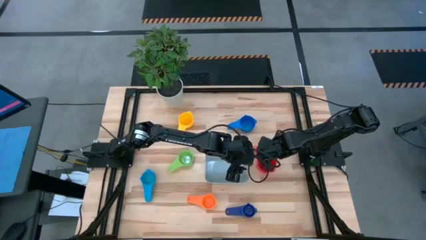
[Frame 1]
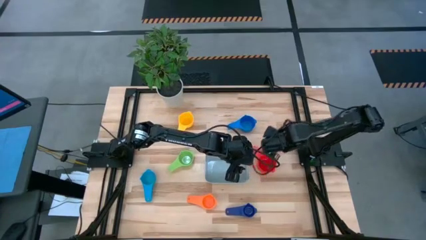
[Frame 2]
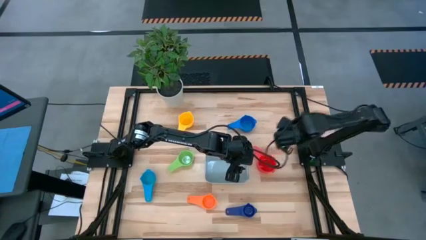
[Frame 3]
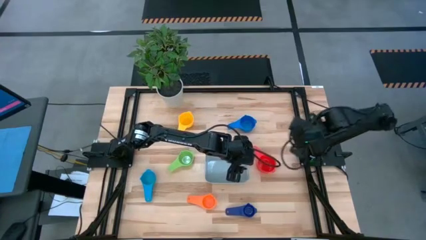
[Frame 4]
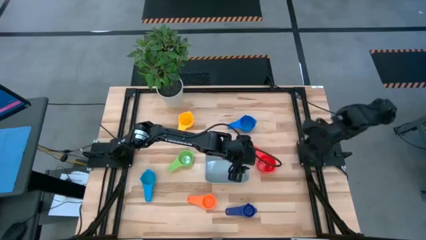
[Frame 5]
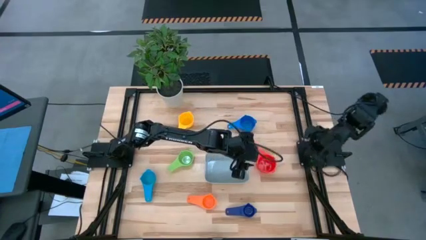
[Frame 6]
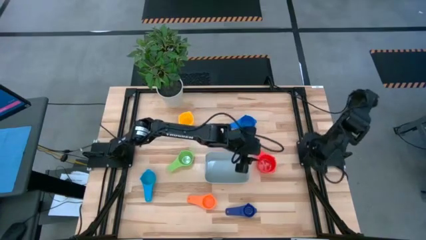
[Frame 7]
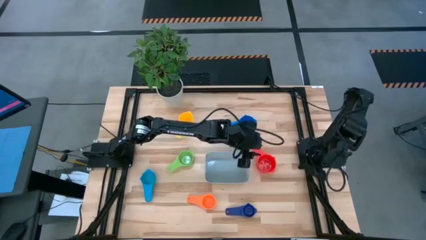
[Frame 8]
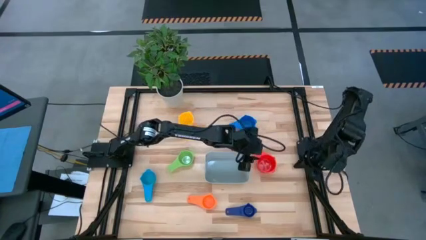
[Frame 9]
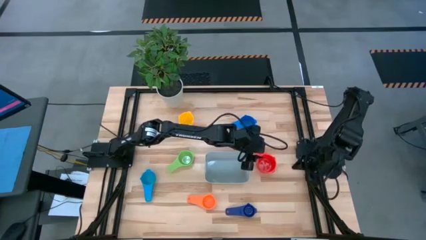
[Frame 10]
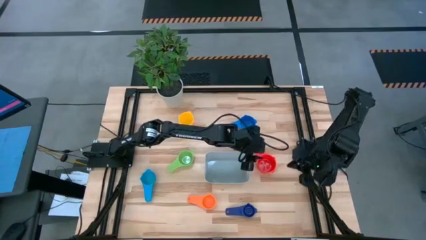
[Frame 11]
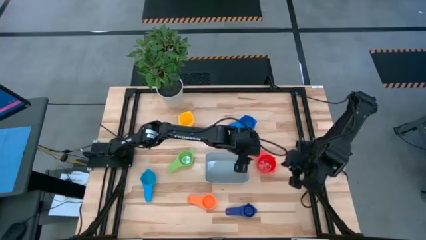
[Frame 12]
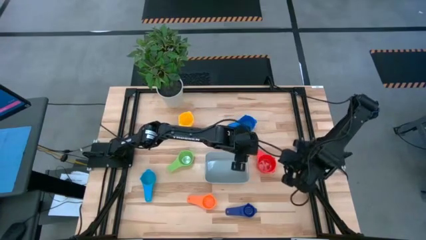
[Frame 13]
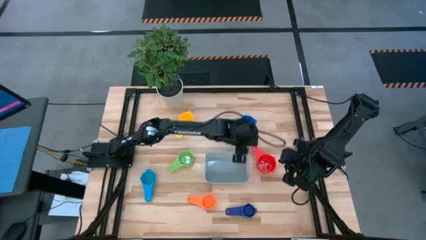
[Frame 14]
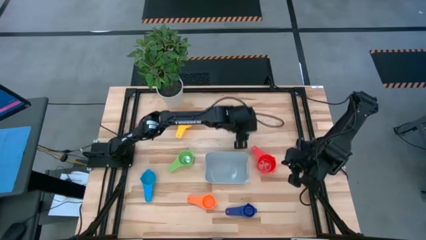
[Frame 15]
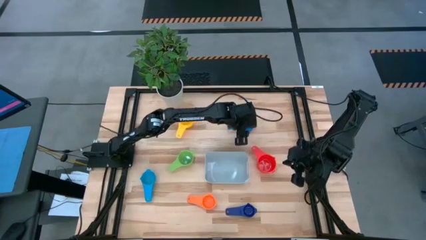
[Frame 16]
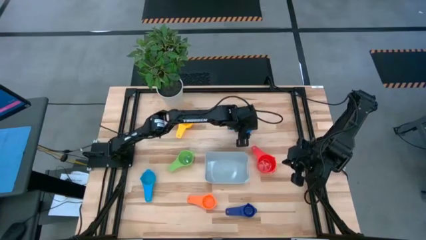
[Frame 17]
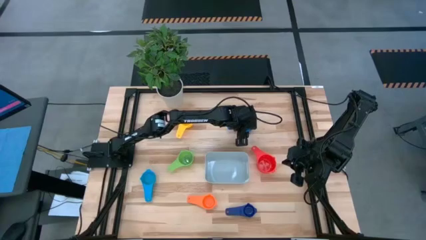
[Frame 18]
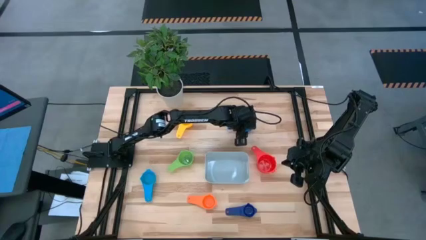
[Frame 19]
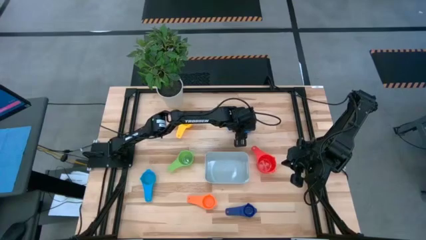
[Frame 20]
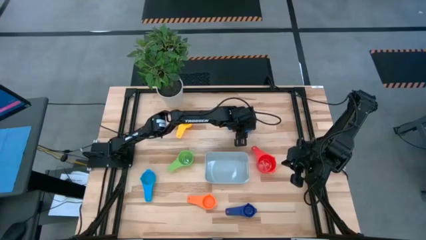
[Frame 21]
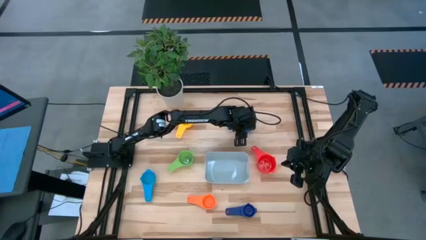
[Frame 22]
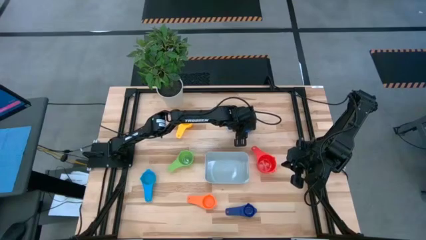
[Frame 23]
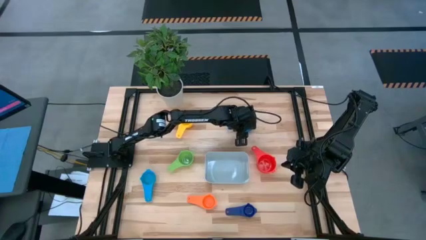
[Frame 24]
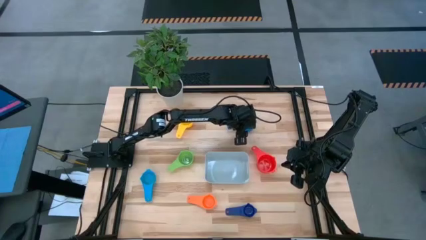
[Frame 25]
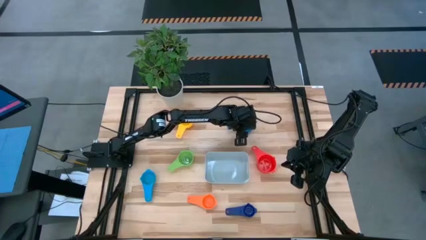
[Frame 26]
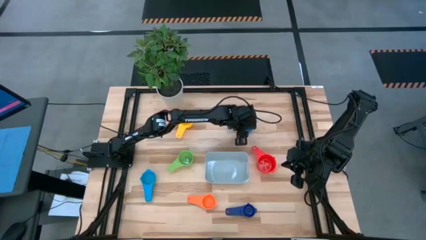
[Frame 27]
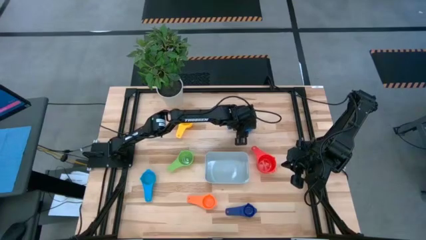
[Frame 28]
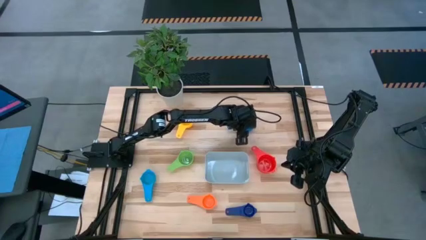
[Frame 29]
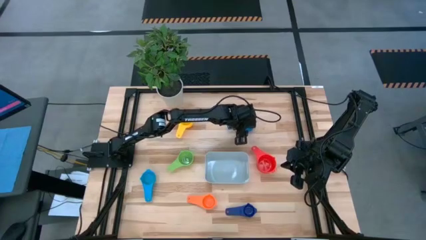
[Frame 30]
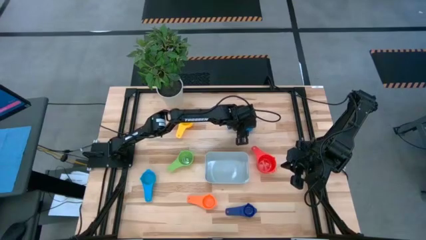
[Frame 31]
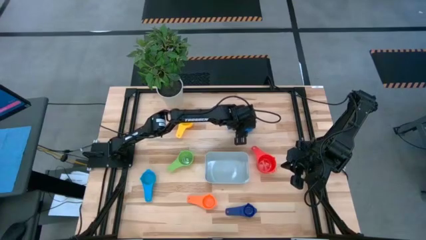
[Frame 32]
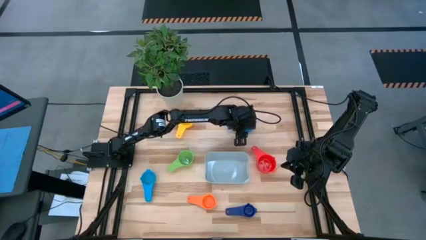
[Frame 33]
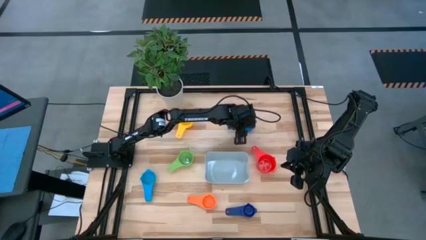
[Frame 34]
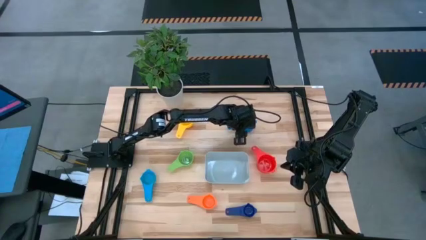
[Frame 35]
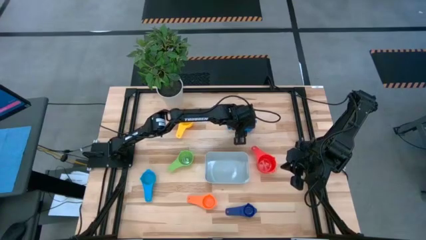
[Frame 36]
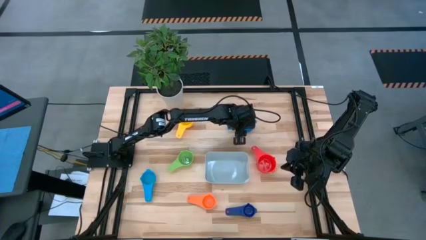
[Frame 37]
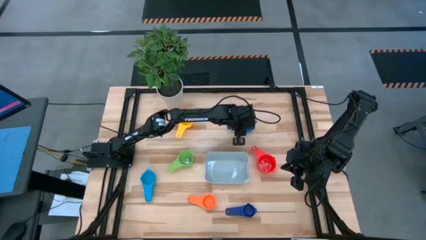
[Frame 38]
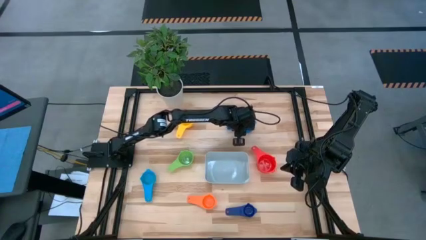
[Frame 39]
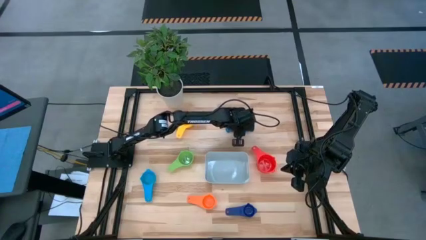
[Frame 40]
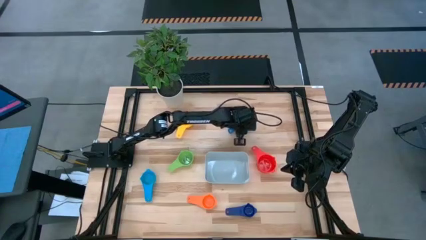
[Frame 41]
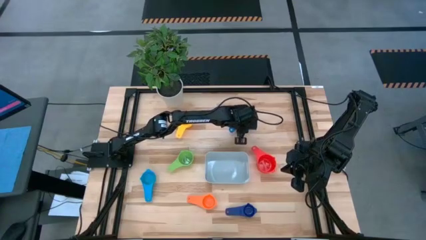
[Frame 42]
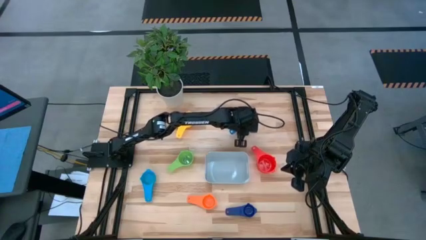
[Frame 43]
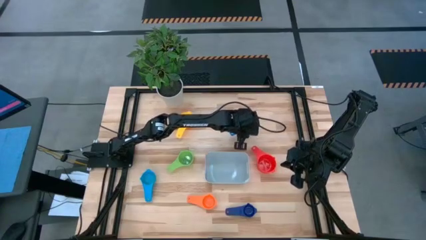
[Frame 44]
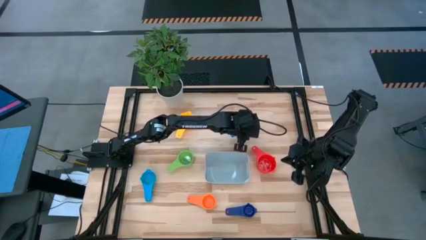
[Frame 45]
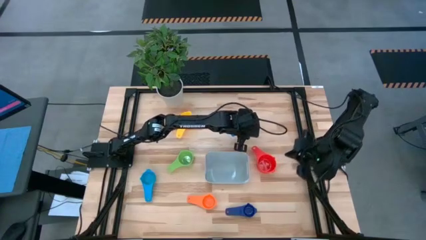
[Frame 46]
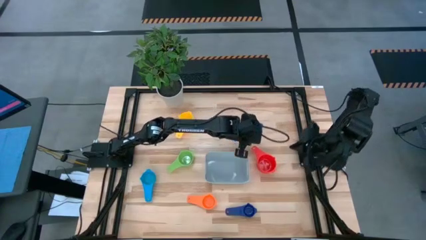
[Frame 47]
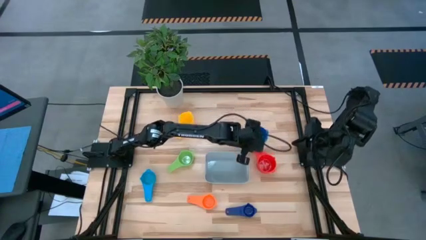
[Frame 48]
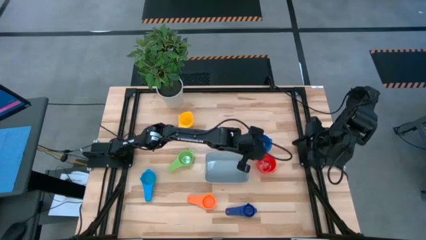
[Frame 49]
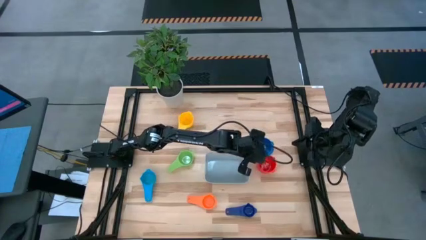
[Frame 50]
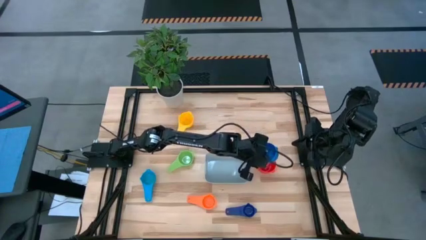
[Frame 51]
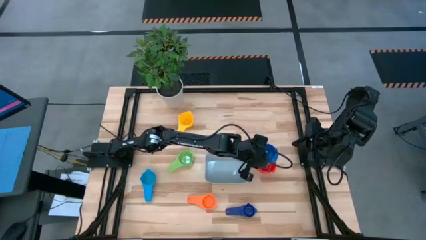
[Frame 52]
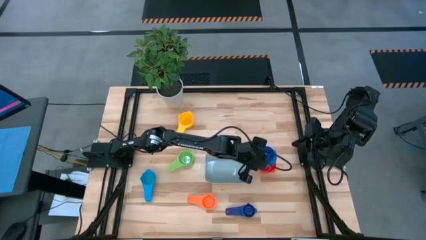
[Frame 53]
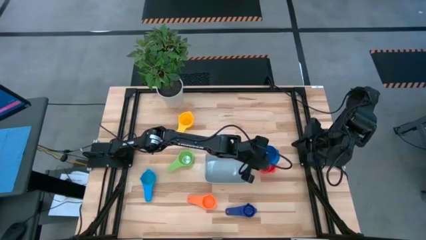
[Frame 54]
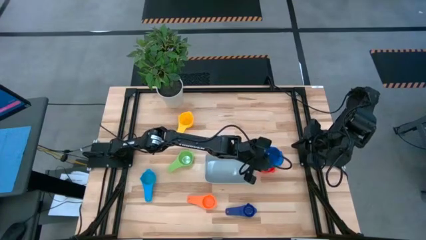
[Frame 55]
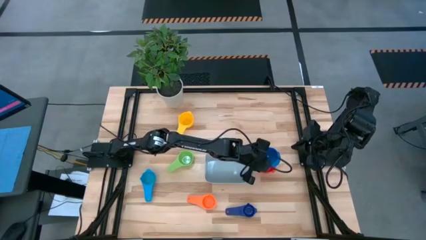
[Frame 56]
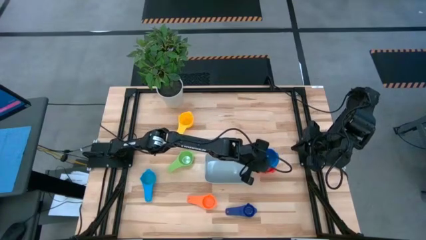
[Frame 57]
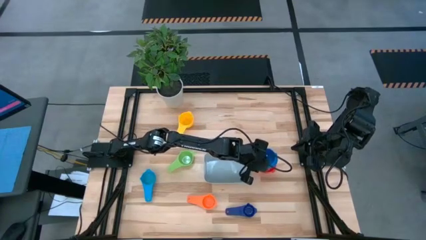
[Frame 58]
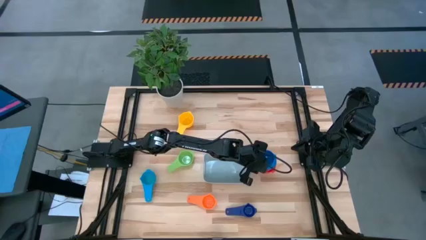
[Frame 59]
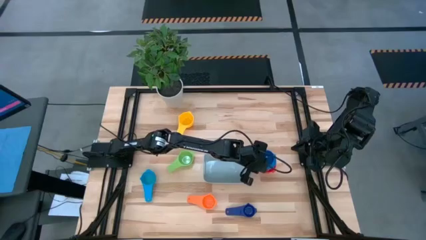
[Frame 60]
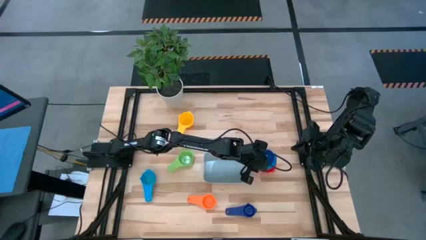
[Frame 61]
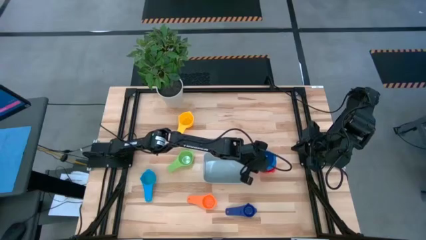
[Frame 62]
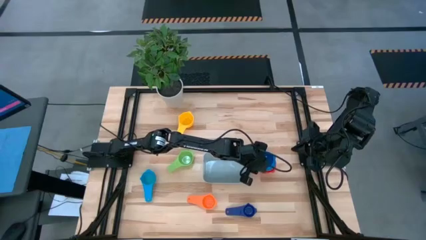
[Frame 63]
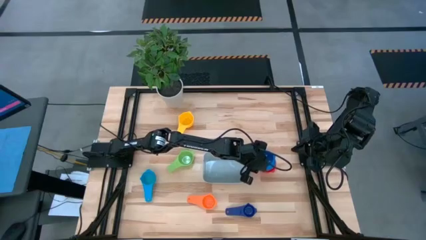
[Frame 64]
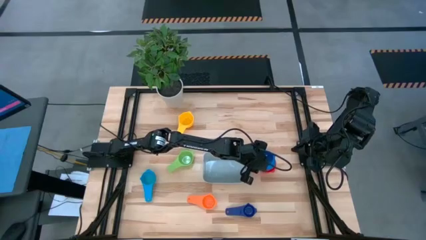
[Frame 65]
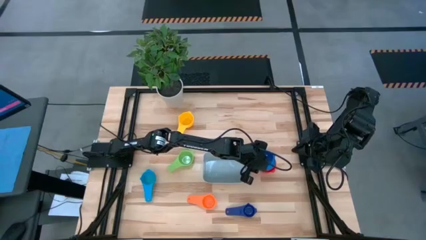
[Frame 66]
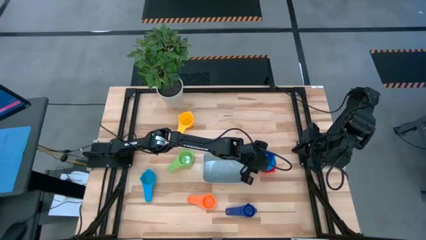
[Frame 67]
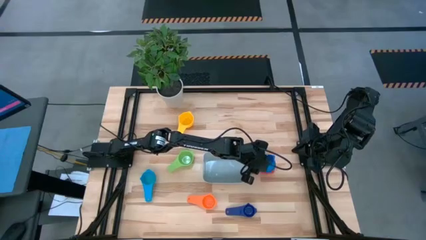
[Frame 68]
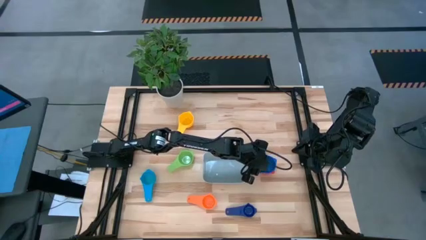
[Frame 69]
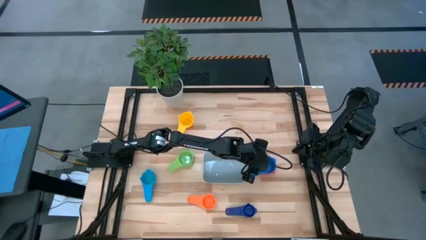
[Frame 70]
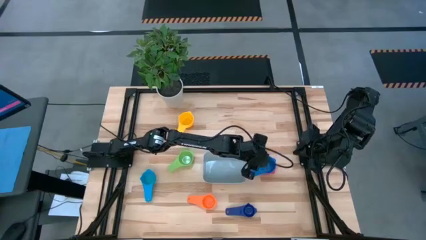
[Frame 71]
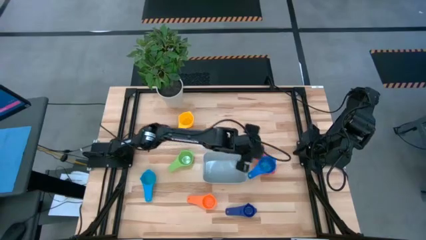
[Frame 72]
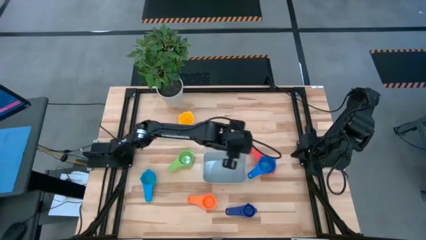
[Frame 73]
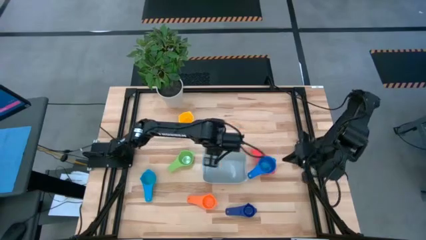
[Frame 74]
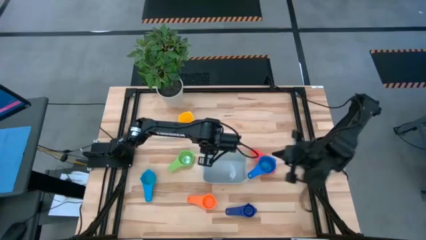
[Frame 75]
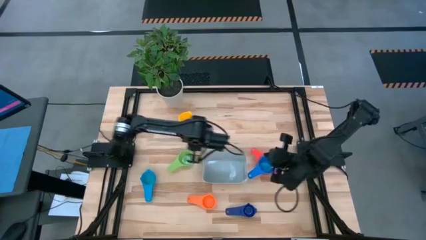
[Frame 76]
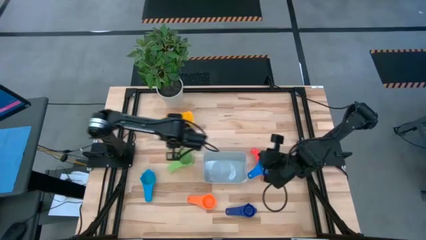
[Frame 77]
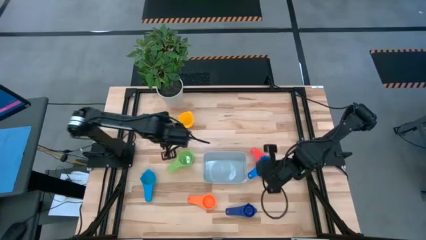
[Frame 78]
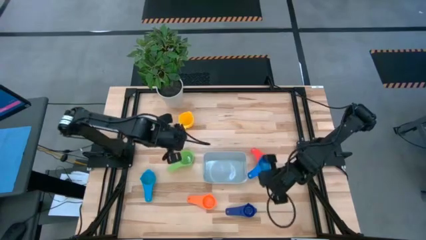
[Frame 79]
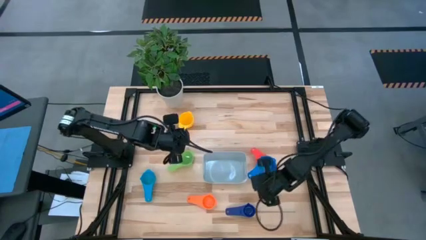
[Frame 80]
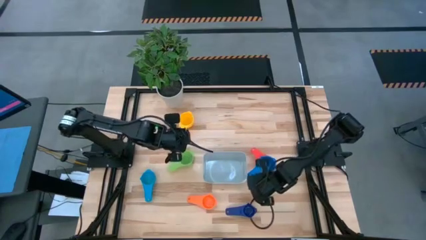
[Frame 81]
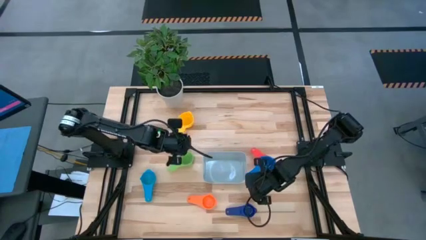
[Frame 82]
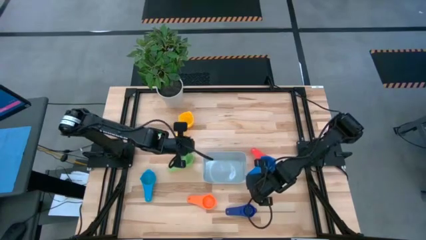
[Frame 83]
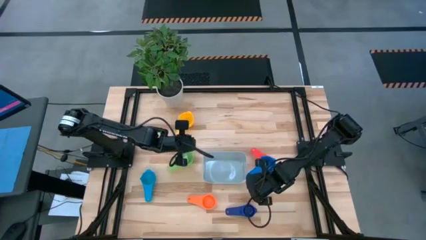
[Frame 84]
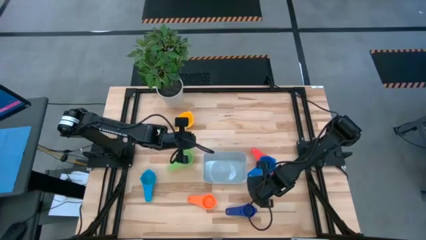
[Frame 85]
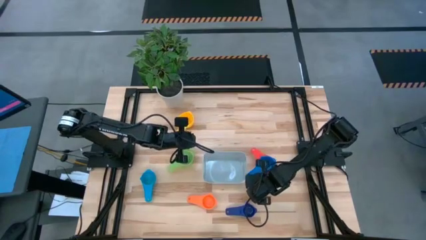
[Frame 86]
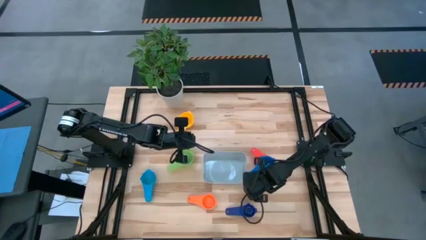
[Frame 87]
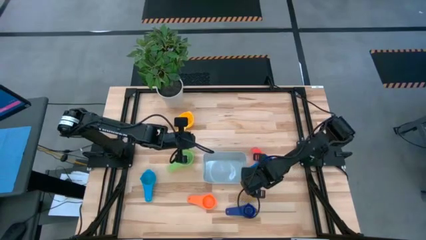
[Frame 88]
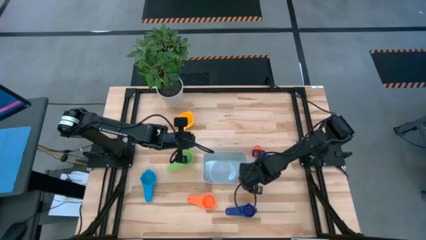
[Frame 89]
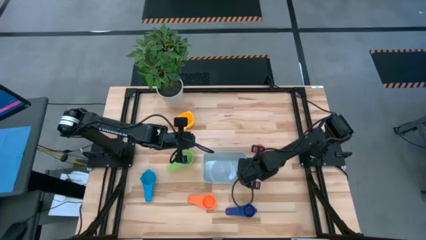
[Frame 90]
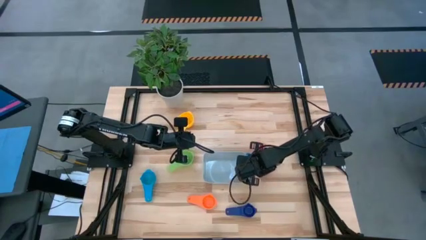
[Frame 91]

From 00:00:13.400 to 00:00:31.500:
Task: Nest measuring cups in basket
Stack the large dark blue measuring cup on top of the red measuring cup
